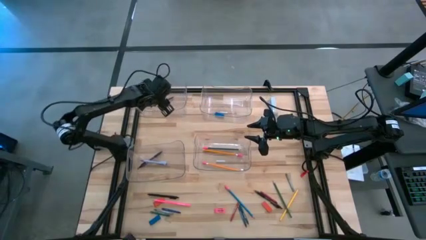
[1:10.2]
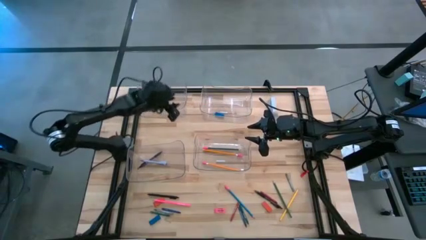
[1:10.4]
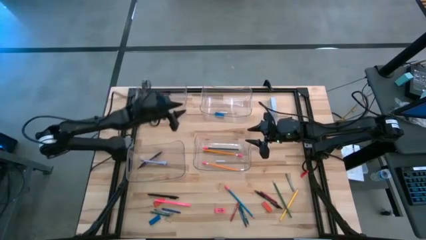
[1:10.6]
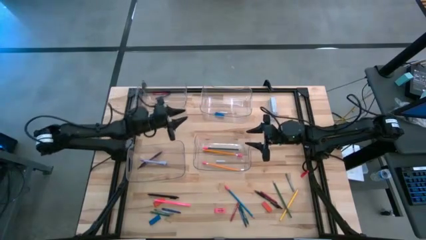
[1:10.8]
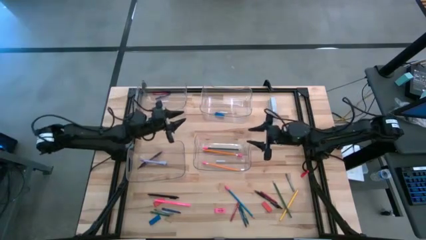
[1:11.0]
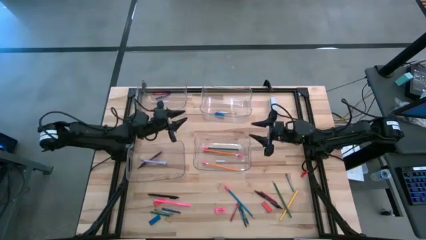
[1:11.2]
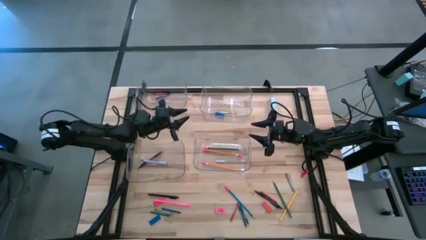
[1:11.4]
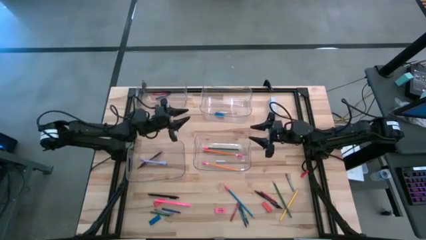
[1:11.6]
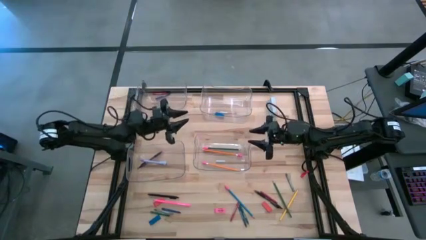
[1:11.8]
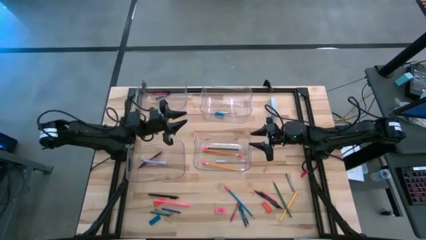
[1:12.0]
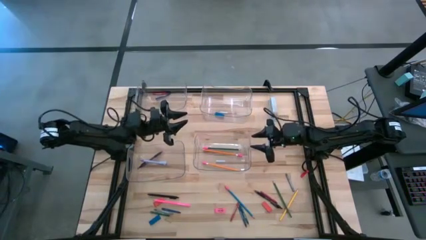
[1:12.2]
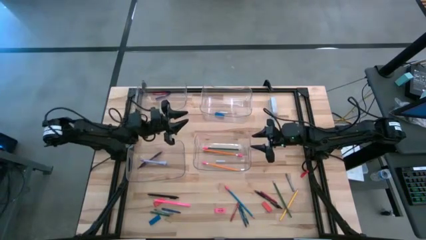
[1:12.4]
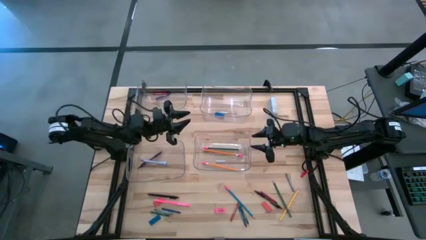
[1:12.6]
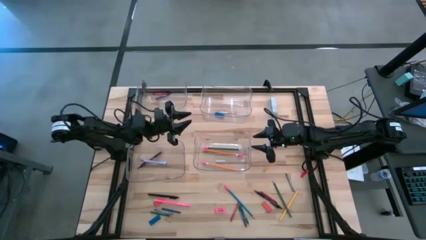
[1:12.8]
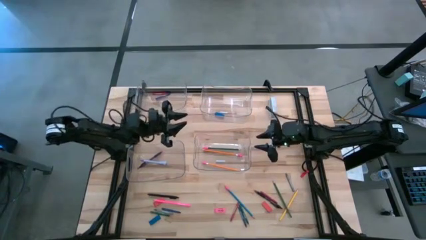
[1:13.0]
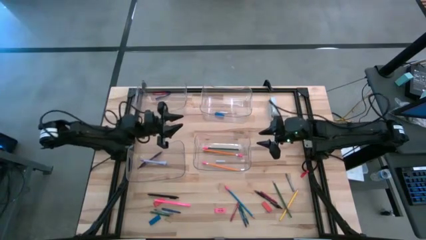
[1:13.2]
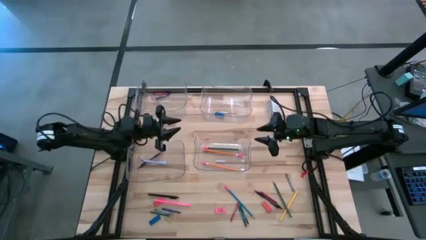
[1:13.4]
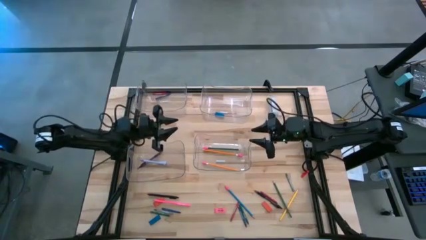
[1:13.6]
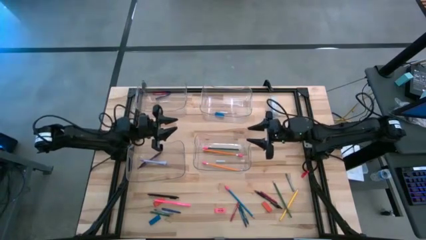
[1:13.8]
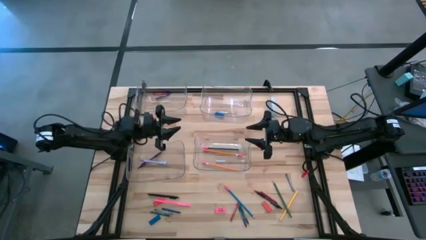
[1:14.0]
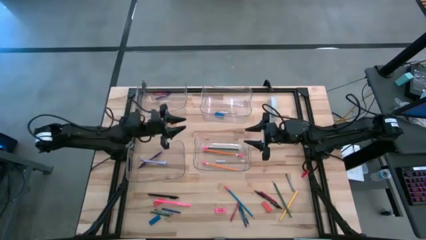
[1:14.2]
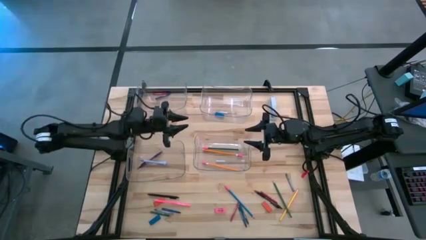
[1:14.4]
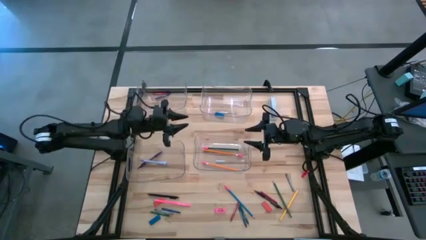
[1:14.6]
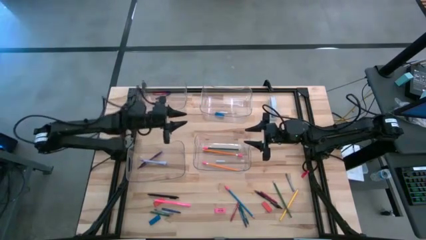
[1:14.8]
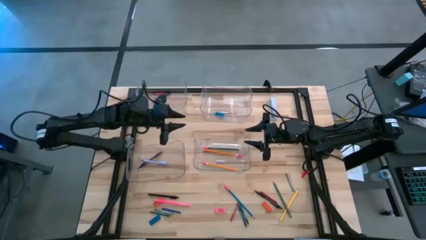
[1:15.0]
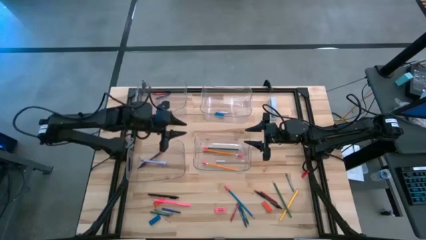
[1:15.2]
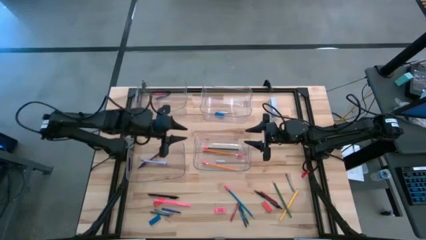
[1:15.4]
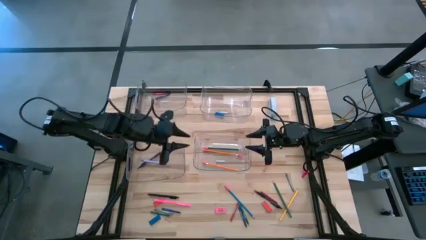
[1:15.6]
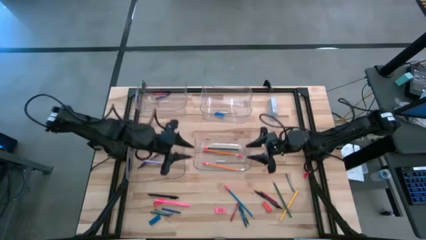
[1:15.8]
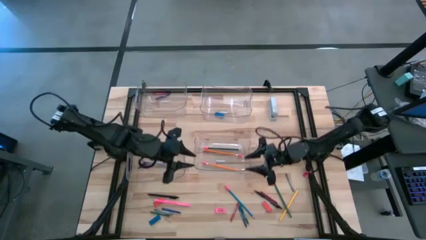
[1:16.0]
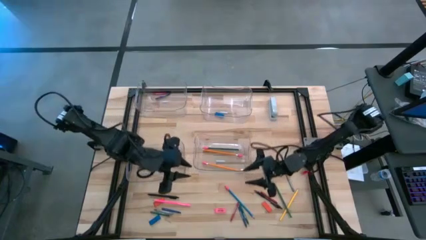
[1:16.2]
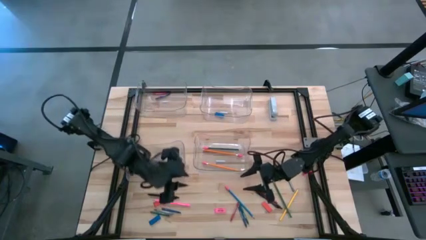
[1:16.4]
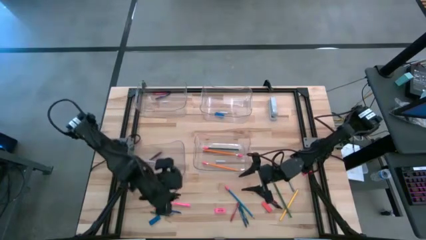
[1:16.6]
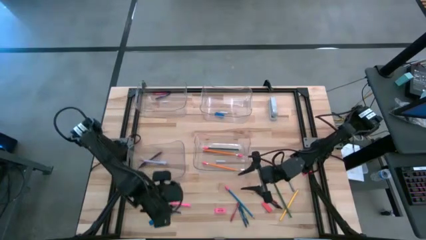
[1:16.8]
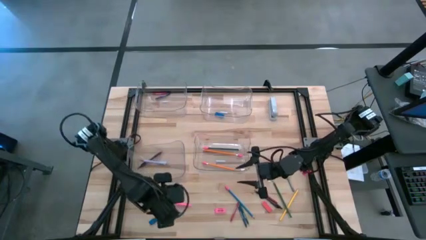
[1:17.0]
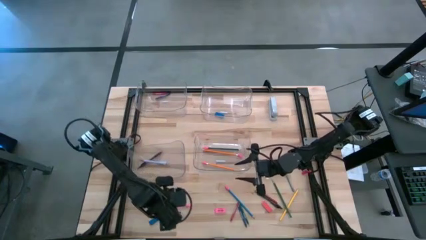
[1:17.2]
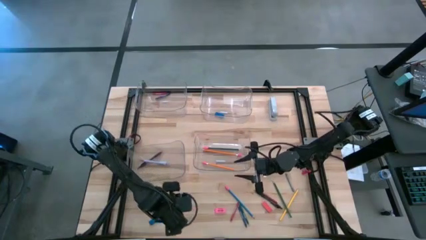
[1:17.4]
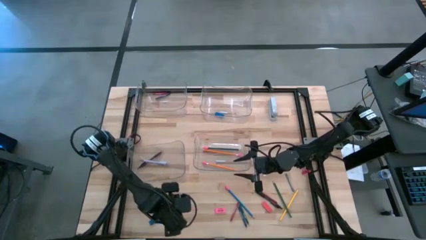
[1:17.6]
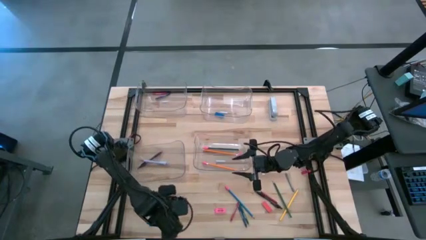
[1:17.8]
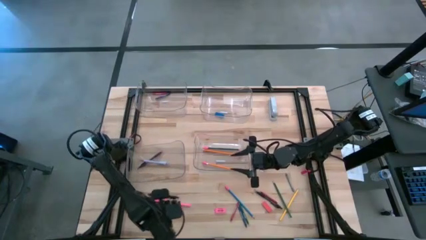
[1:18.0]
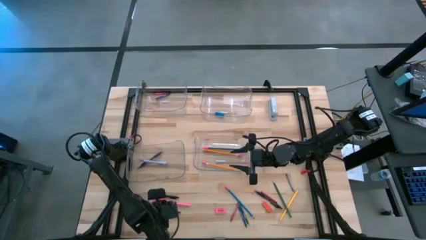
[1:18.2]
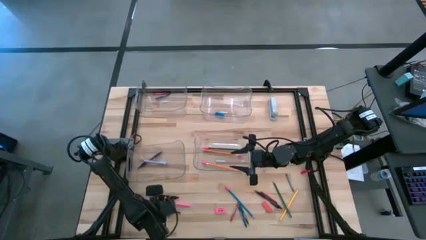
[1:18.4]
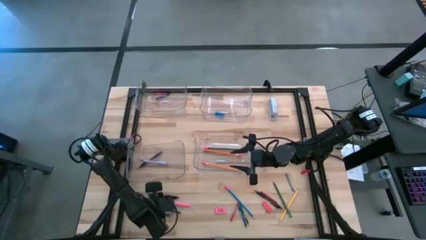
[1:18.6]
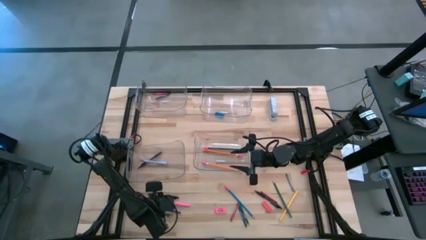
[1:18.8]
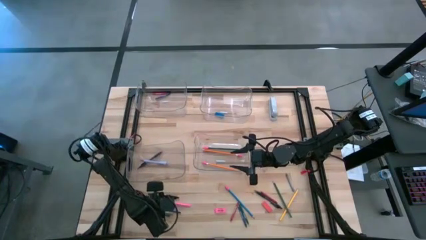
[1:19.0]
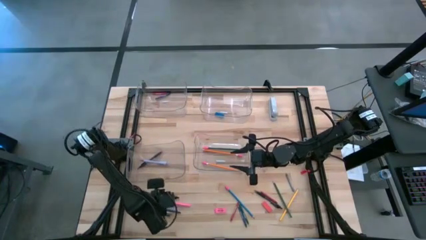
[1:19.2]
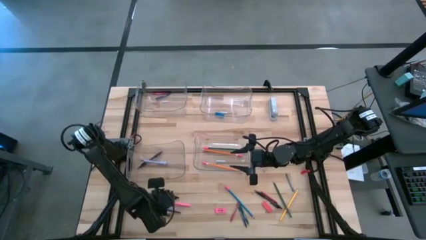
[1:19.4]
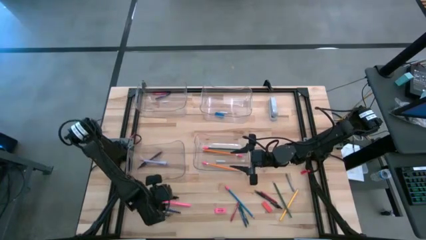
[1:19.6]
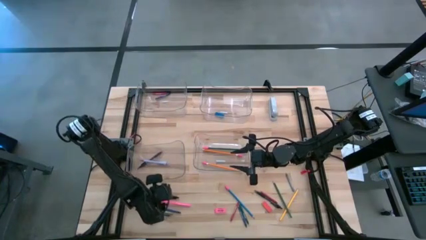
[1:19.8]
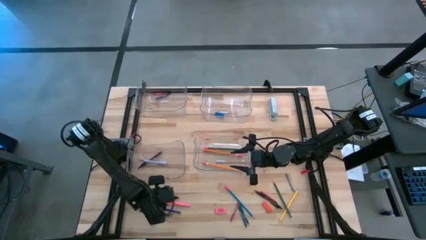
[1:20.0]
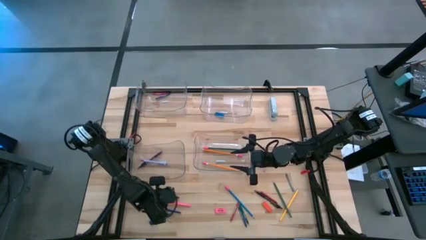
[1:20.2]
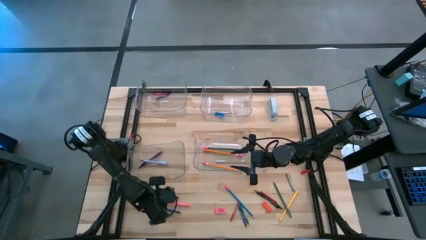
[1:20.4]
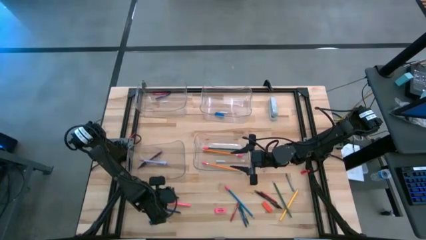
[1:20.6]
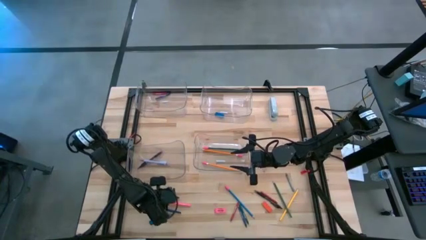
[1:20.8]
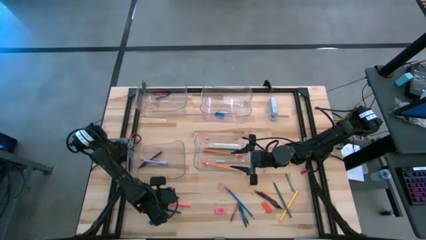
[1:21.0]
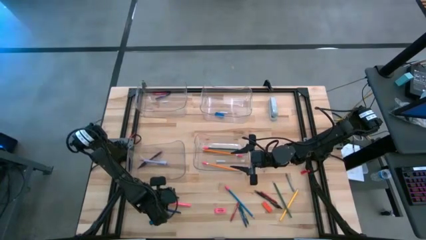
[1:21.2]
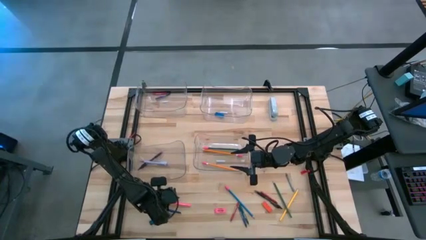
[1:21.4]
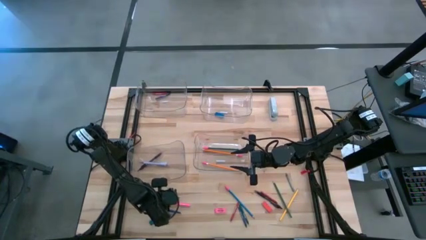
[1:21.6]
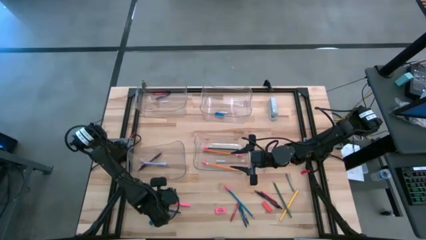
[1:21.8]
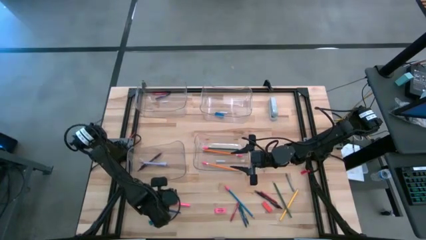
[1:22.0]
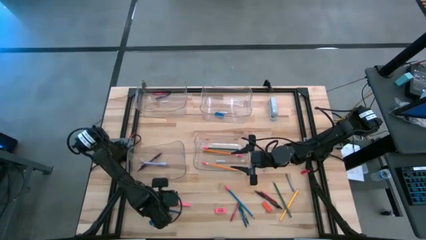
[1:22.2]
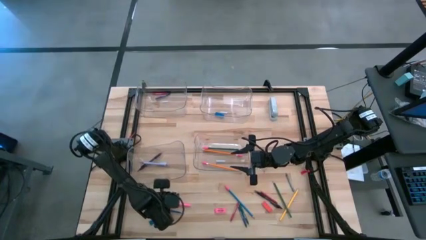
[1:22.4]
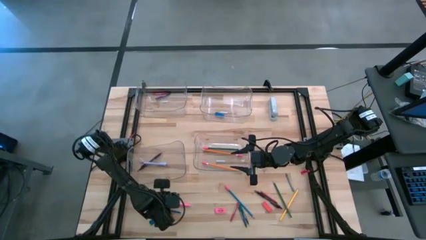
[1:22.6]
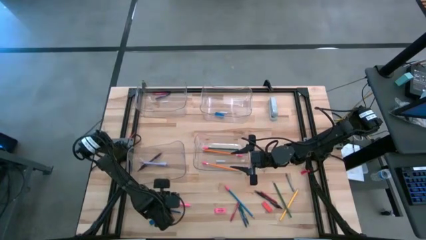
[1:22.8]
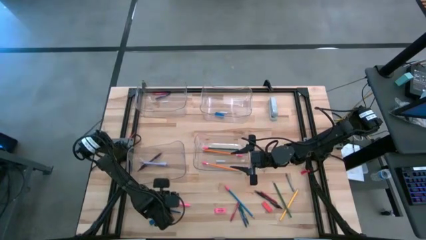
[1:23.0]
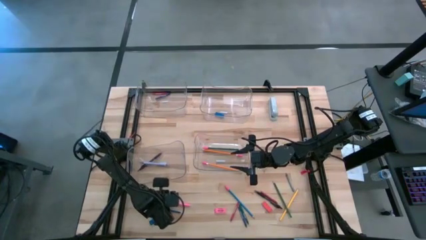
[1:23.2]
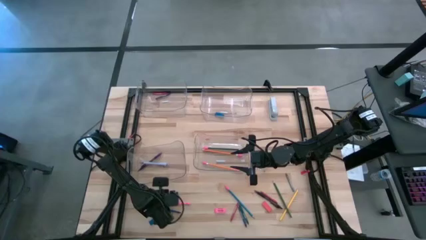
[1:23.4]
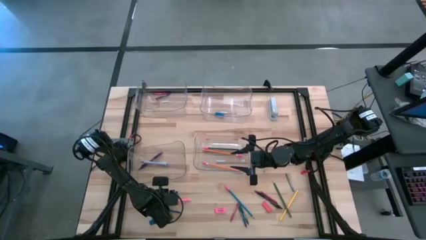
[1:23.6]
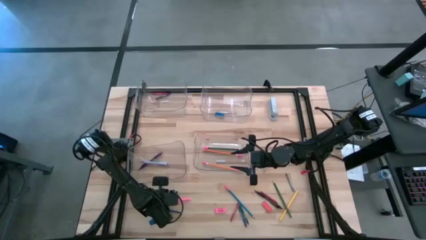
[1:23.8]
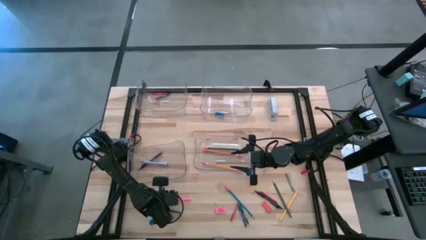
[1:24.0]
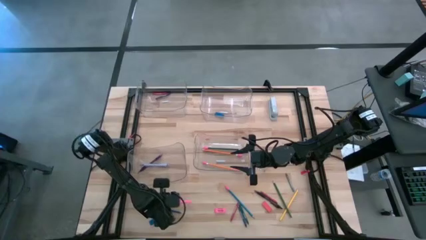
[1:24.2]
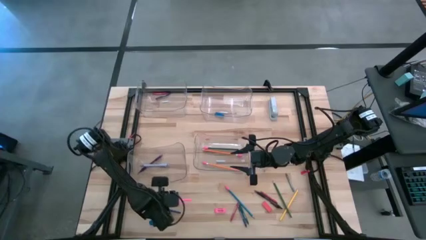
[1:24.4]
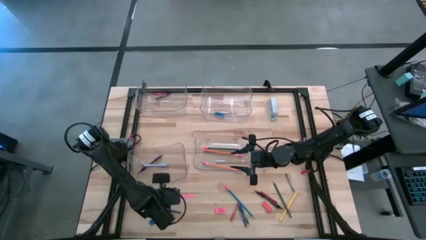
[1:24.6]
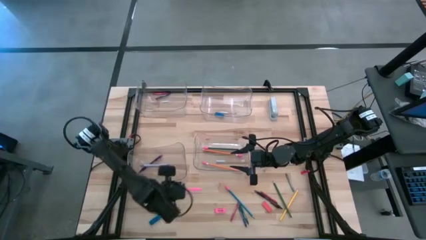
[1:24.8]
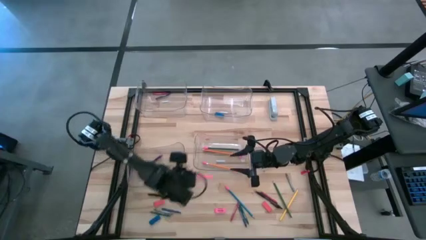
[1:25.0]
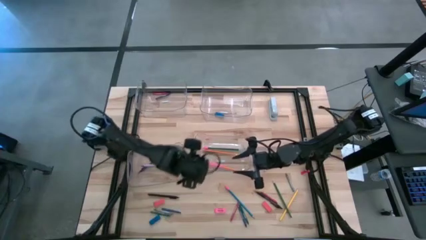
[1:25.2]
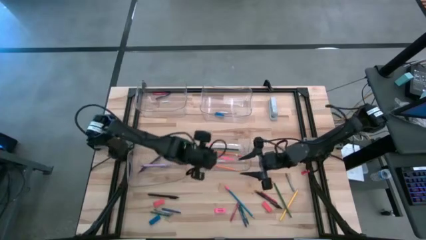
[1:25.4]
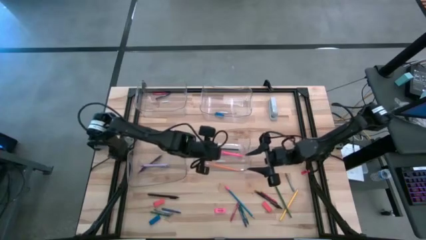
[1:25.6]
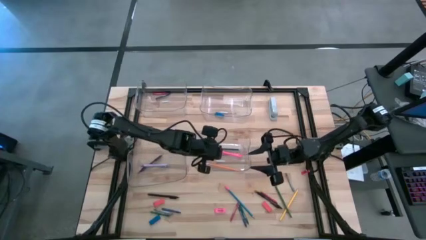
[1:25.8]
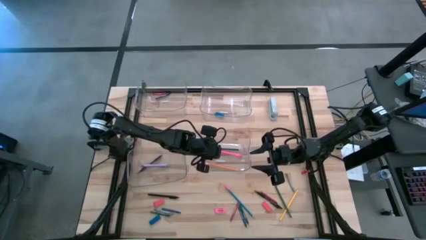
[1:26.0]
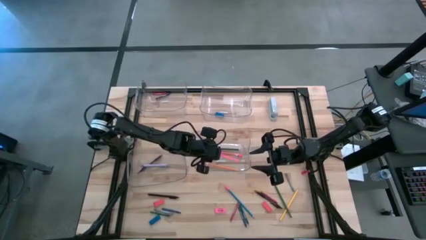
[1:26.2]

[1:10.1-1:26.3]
Task: Sort crayons/erasers/pens/pencils in bins
Put the pink pencil into the bottom right transparent bin
